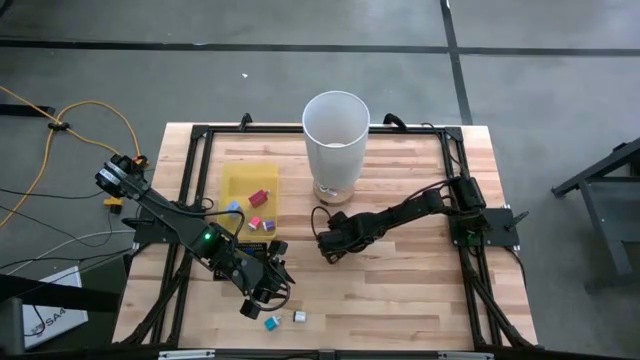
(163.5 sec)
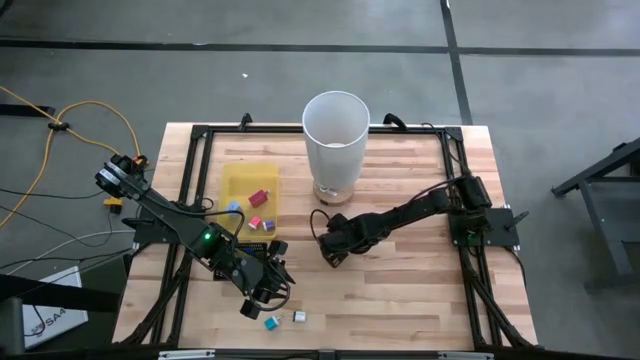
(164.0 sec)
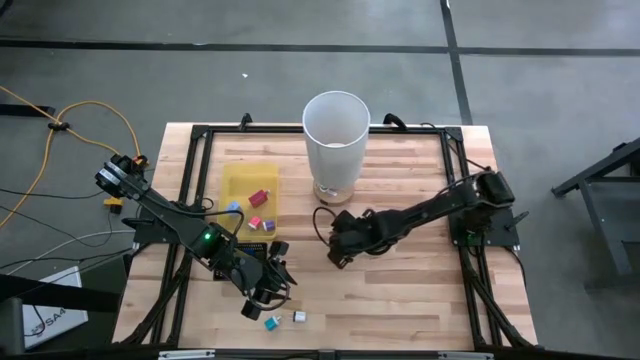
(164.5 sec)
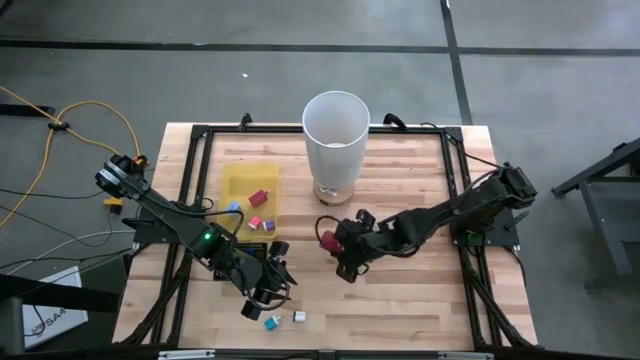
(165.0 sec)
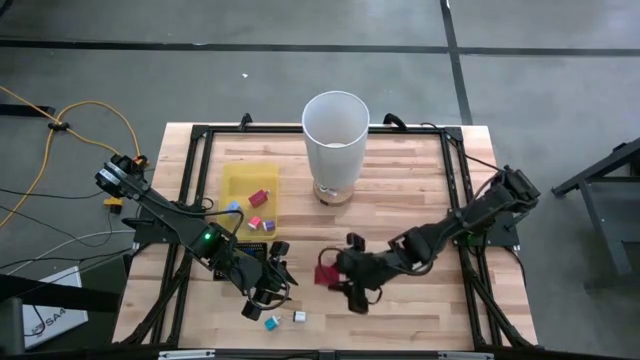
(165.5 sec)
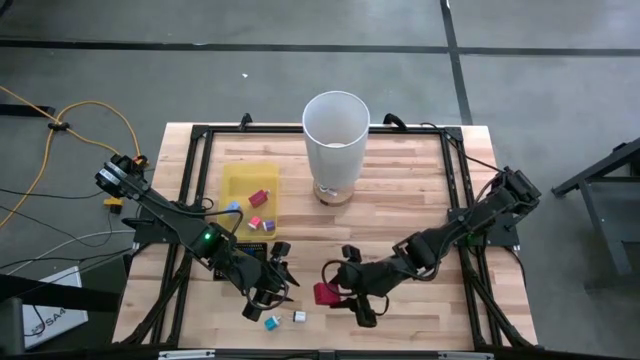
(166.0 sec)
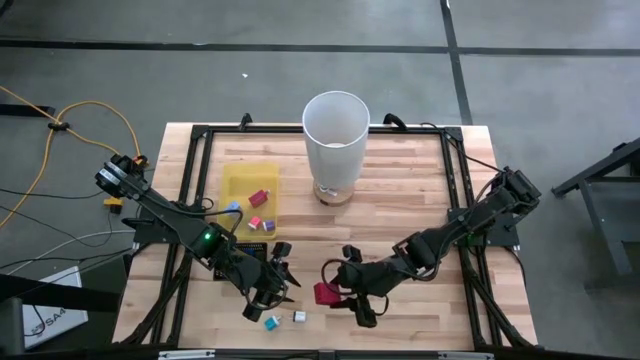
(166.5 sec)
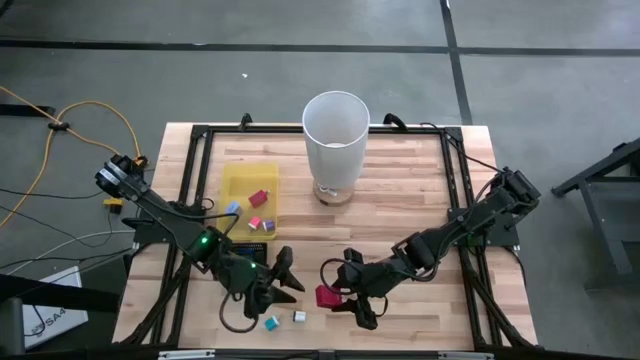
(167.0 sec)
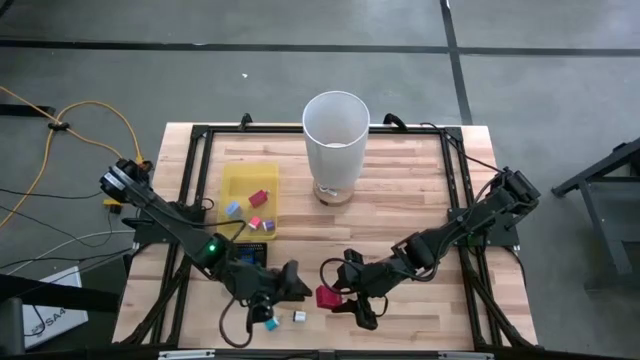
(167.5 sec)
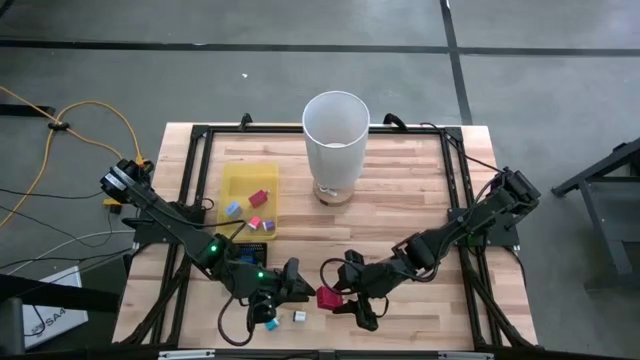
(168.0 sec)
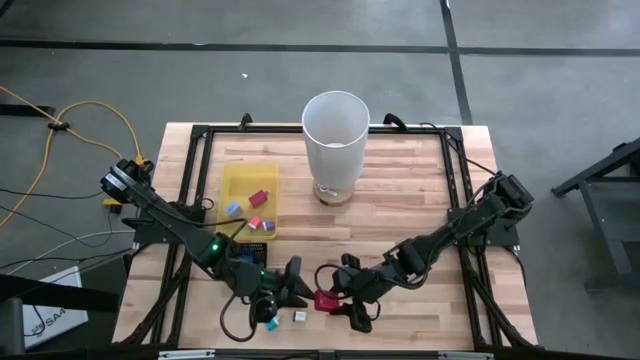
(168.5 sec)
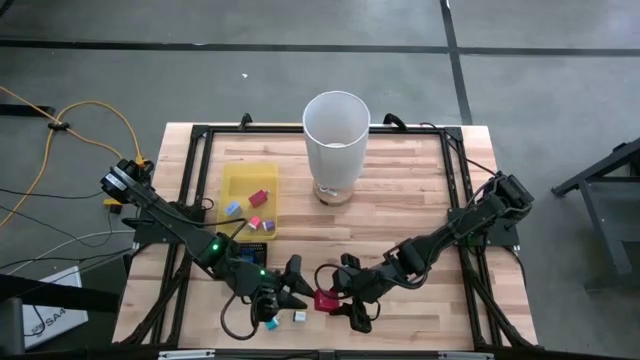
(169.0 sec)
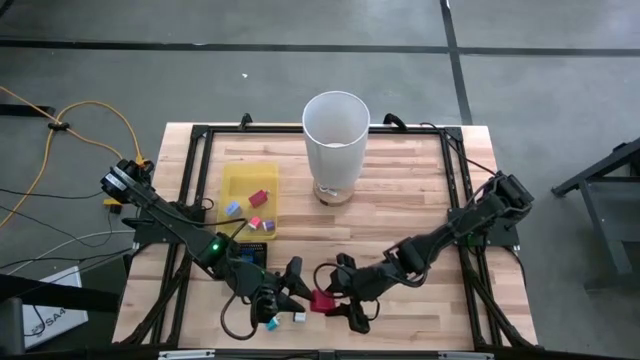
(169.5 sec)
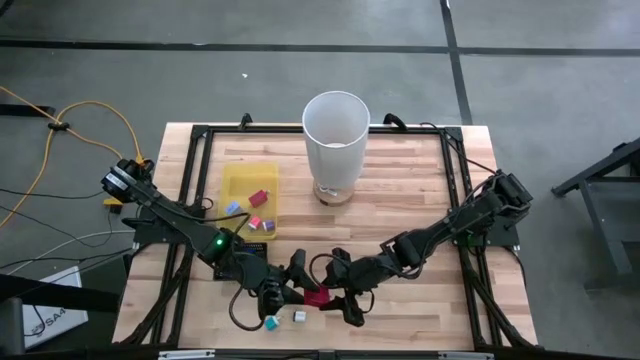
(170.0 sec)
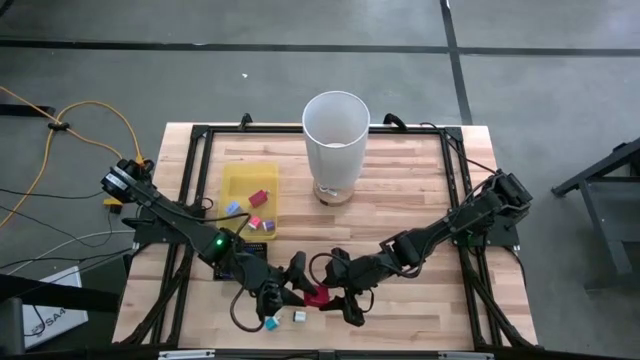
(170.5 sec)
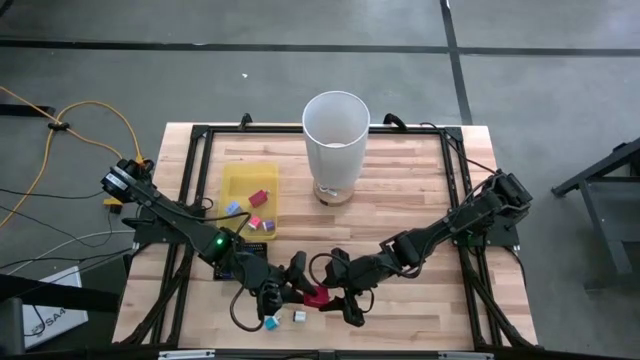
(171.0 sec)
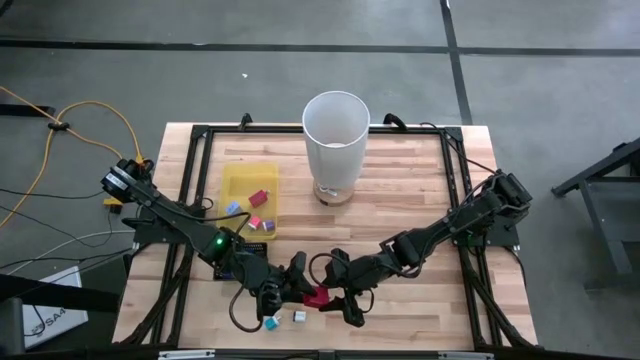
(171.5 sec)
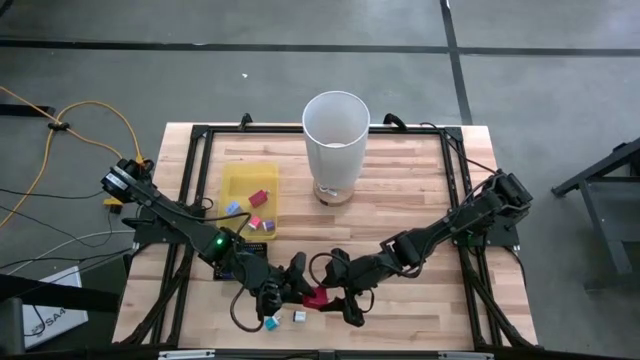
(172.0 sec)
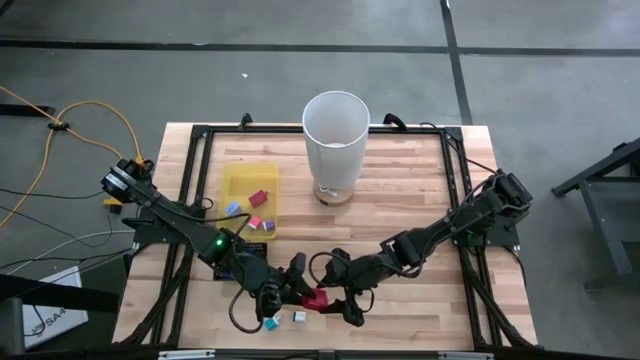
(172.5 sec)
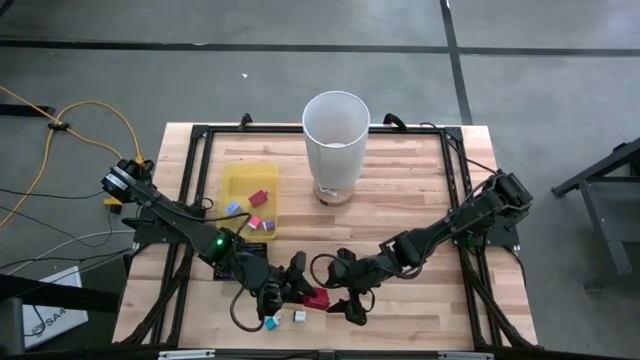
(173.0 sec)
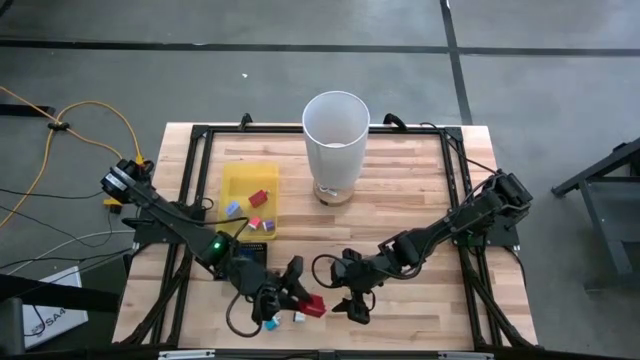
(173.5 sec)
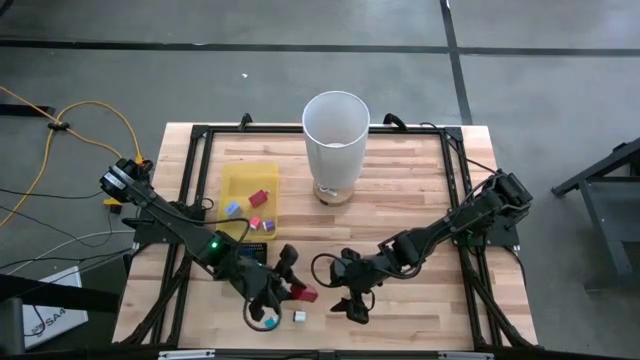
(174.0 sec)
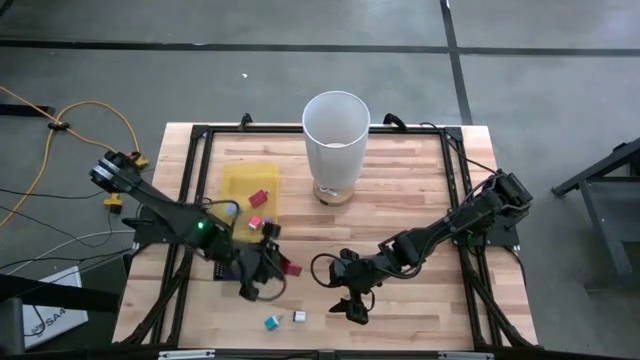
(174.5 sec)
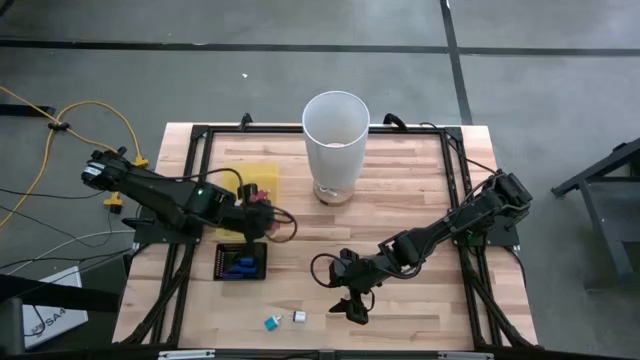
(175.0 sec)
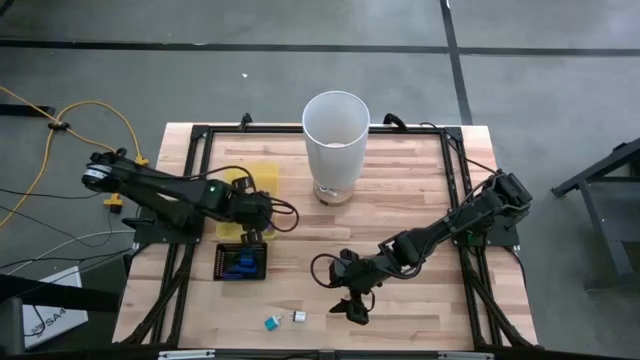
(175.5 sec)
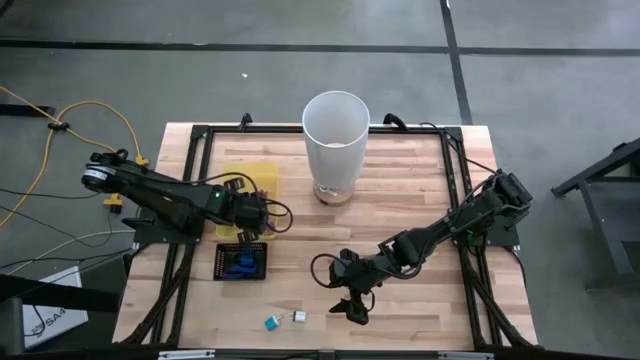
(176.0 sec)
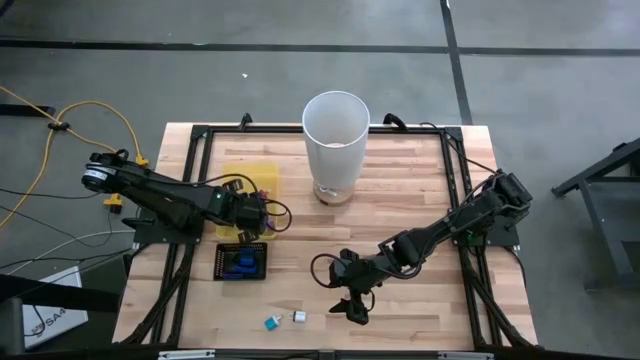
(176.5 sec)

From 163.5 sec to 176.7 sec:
Task: Pick & Place Office items
Put the red charger adapter into the yellow bin

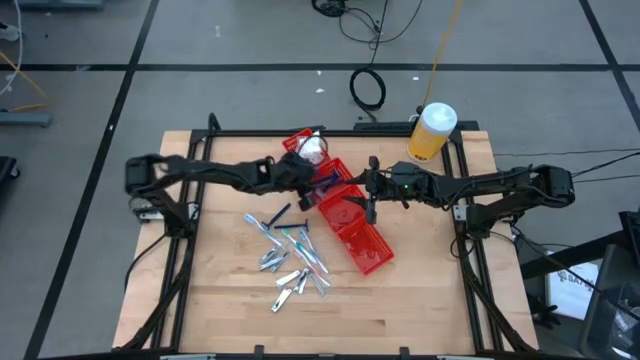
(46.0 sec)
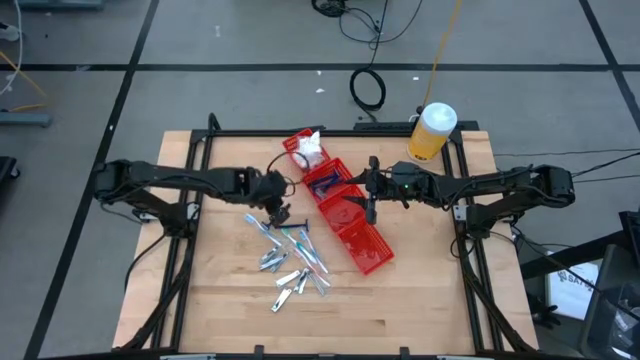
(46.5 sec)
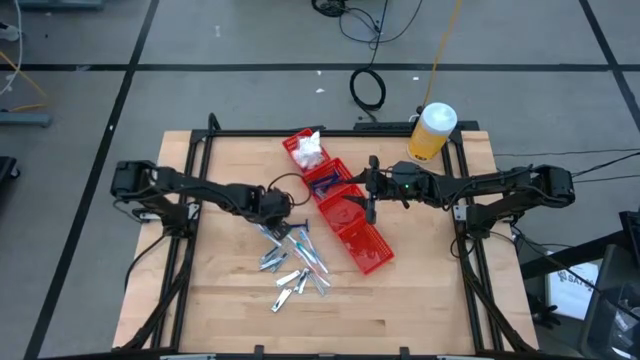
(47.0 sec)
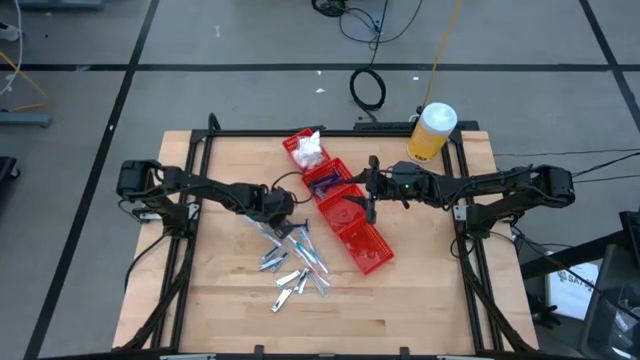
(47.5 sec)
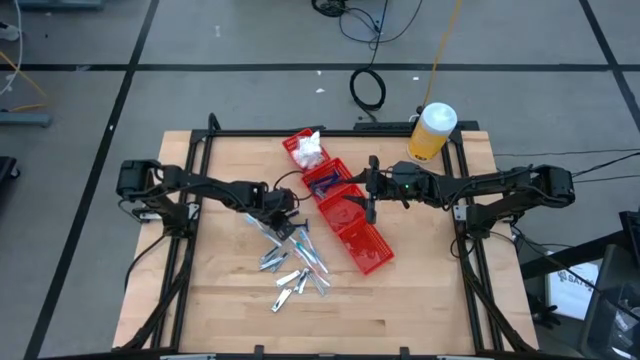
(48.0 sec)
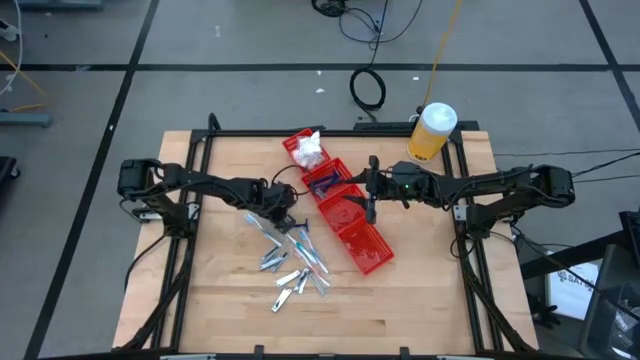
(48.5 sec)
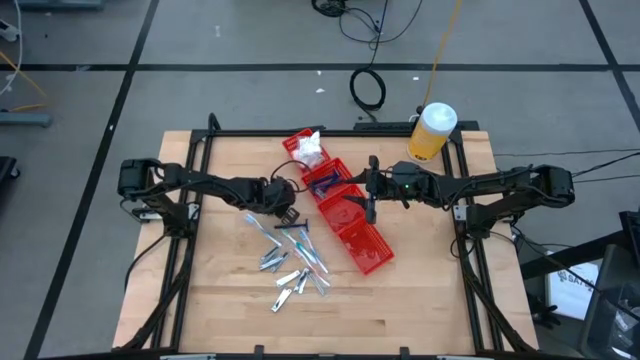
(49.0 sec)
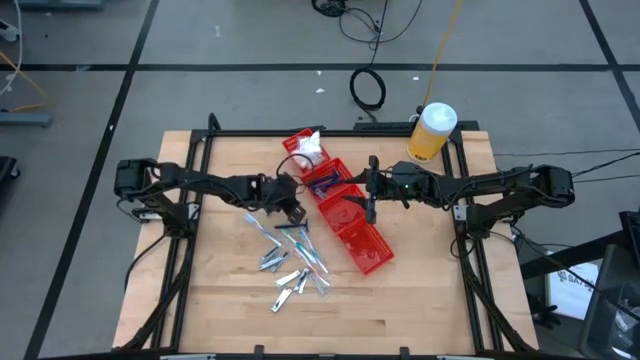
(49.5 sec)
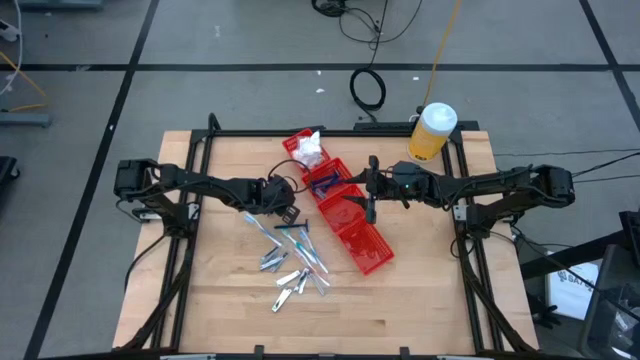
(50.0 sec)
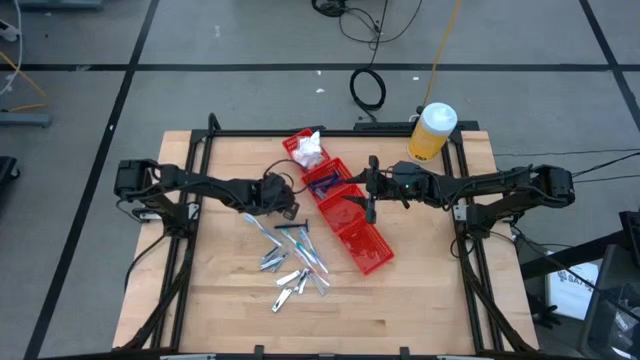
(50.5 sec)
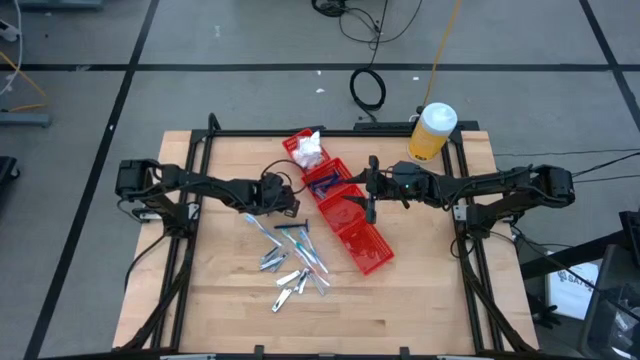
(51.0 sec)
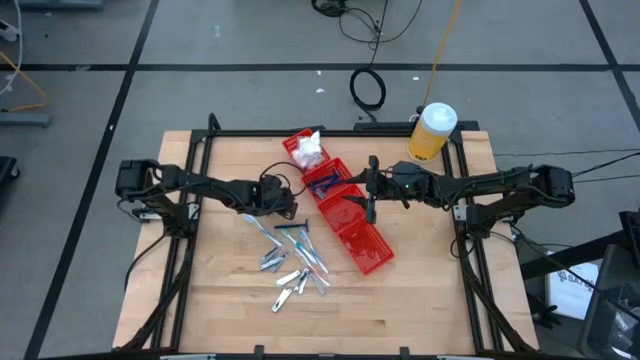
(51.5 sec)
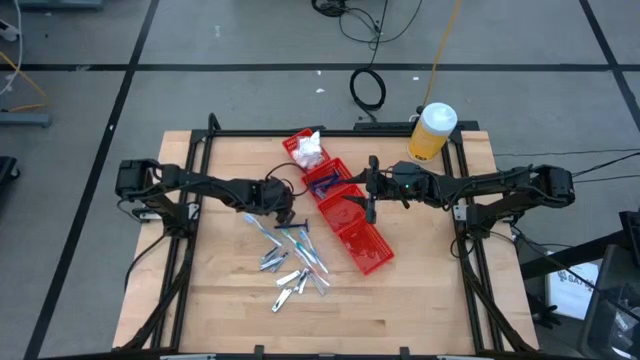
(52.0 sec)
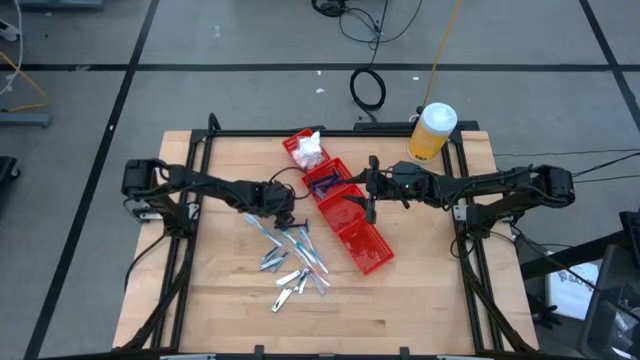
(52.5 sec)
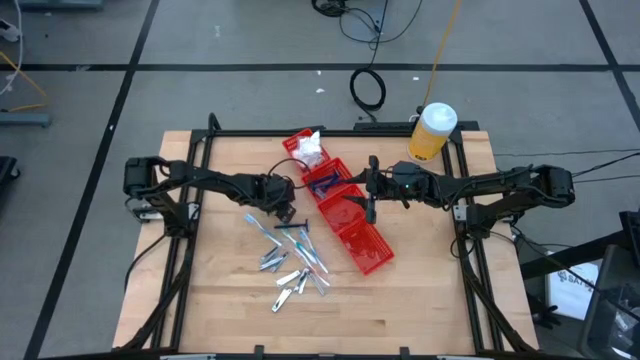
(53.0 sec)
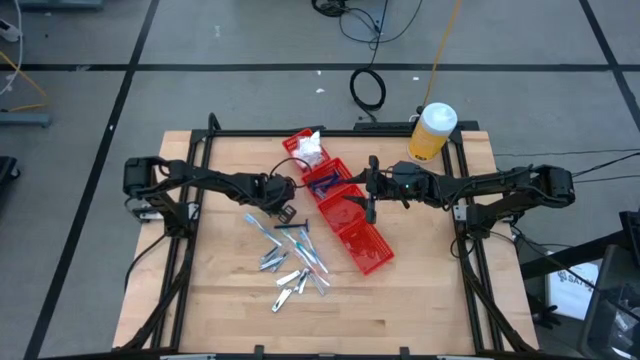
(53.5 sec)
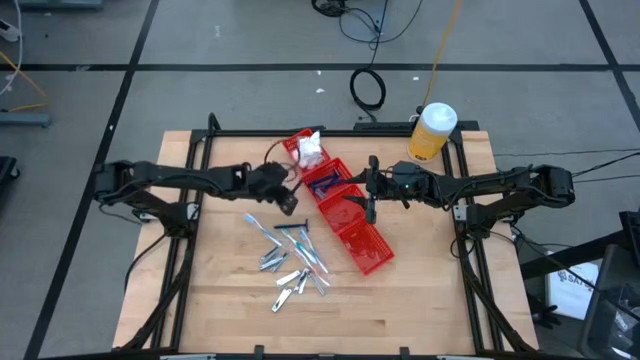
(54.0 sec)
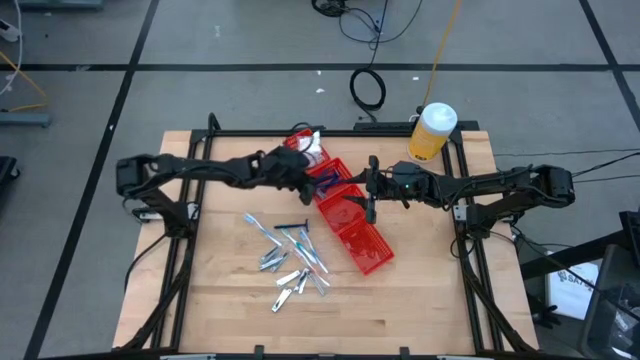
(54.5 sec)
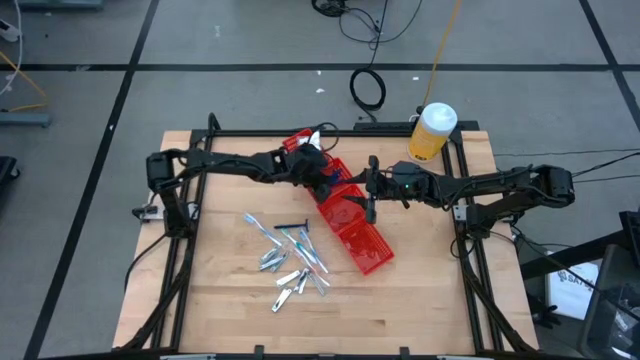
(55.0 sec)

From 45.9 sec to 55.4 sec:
Task: Pick & Place Travel size toiletries
Put the blue razor into the top middle red bin
